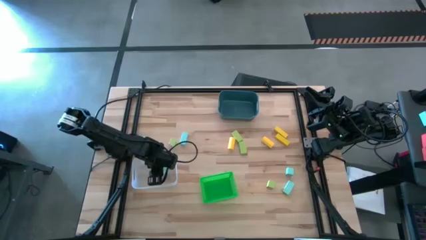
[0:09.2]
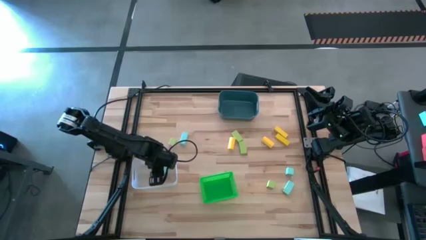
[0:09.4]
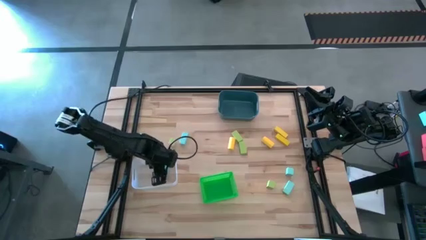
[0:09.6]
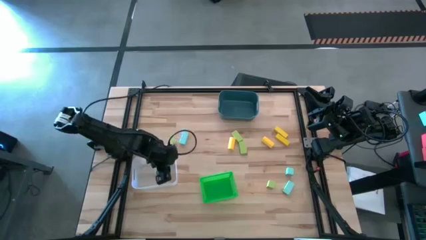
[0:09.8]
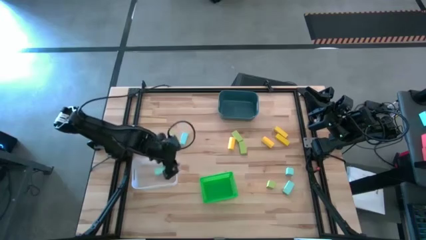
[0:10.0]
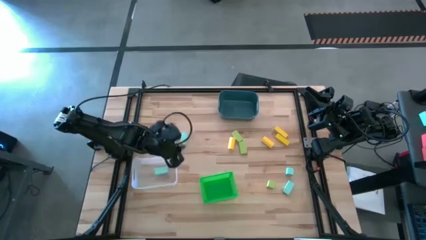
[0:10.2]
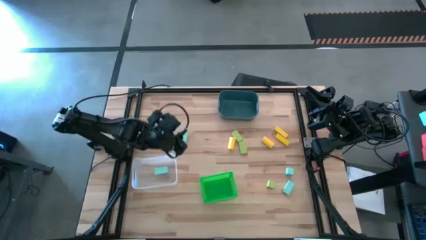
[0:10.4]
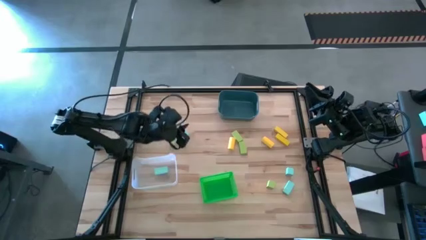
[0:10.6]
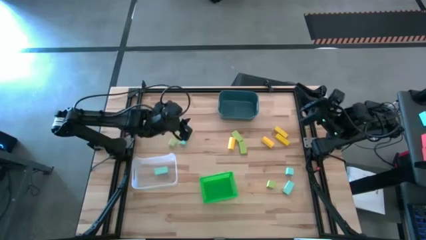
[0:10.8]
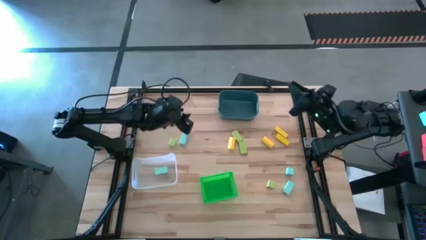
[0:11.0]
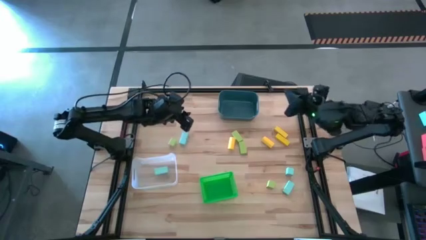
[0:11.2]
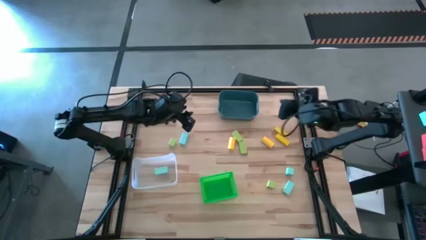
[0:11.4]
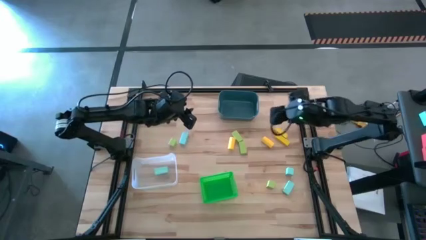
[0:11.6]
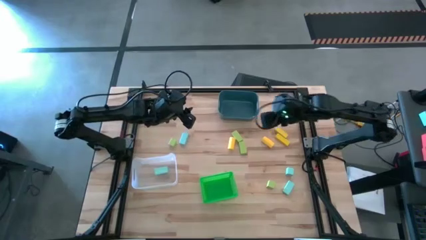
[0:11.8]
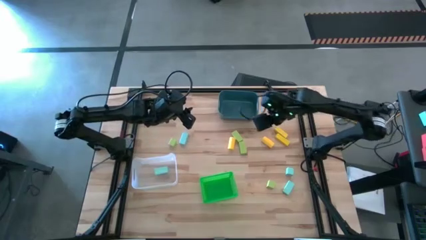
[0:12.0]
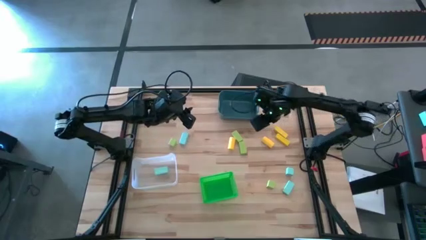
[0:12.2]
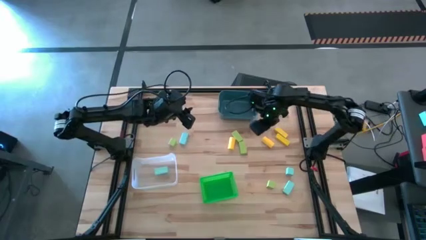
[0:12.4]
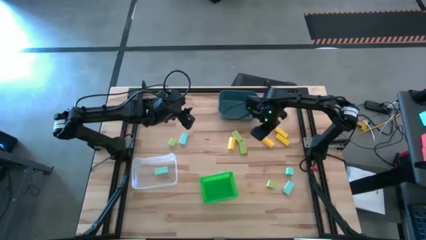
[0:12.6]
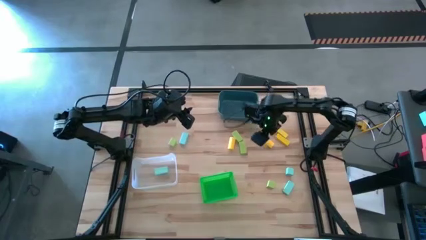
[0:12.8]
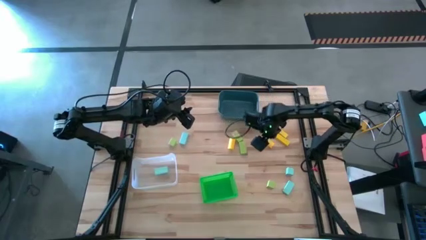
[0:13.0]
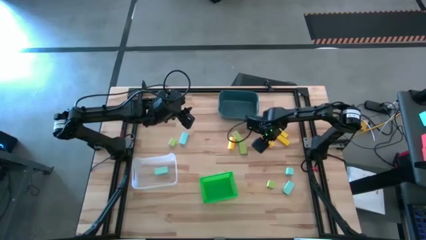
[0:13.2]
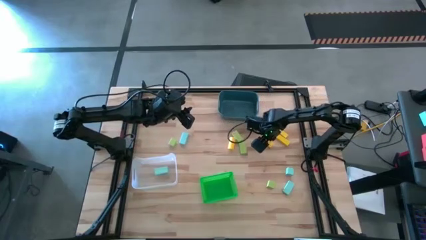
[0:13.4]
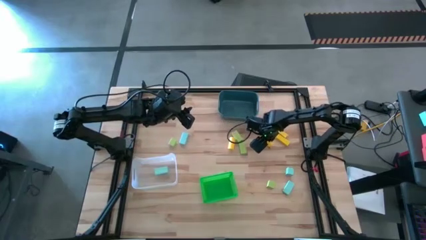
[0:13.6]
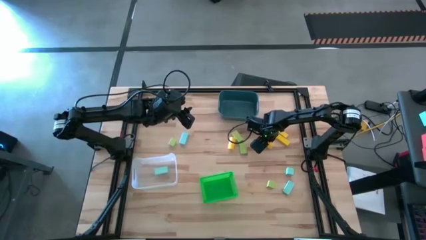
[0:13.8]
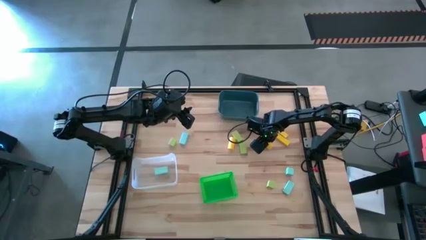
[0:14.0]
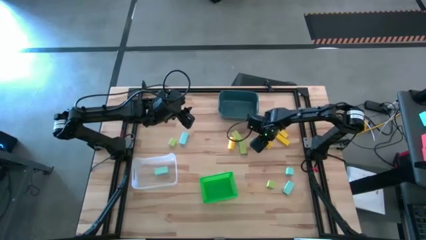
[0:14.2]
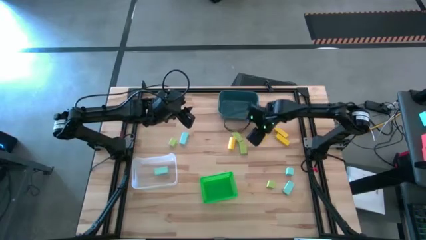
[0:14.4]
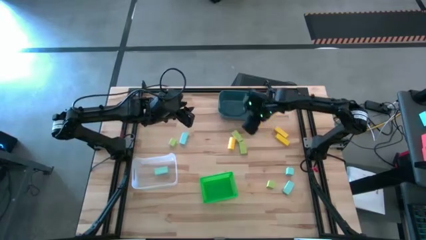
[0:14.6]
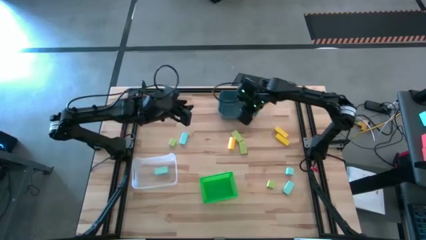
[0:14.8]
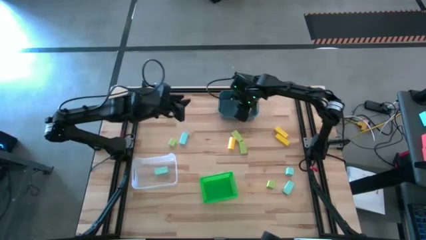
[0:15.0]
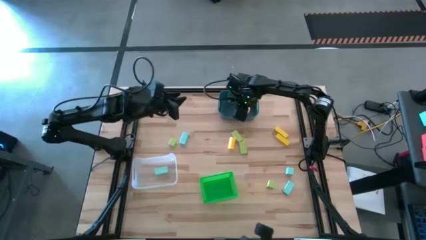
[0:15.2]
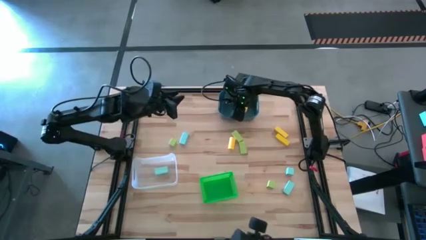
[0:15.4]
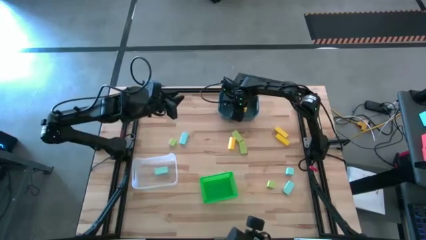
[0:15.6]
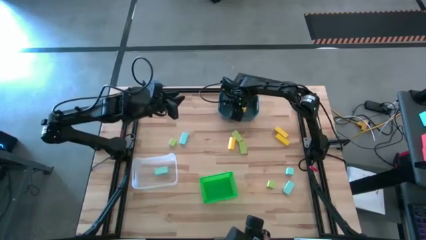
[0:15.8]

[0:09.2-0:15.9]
Task: Sort & place blocks by color
Put the yellow block into the blue bin

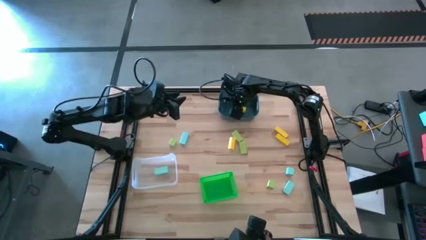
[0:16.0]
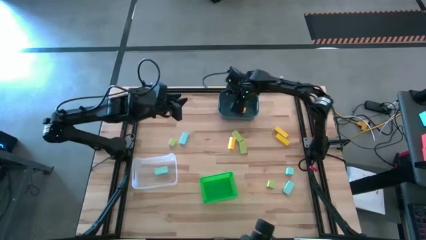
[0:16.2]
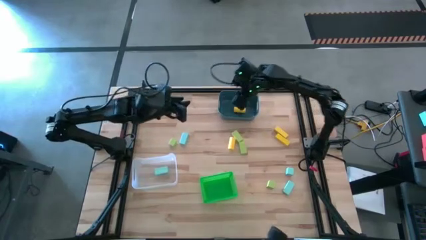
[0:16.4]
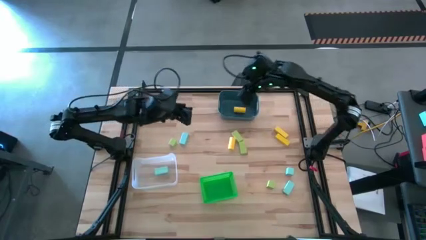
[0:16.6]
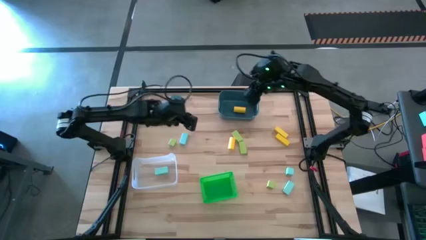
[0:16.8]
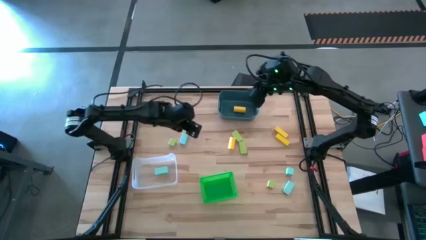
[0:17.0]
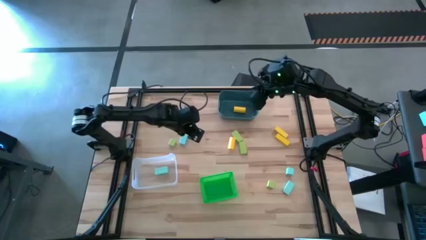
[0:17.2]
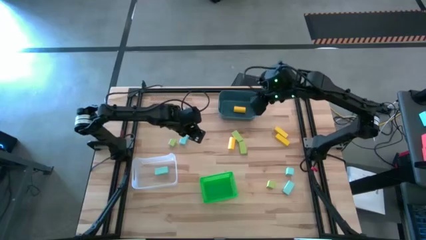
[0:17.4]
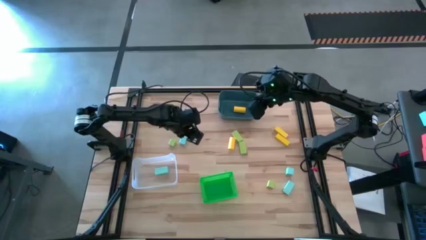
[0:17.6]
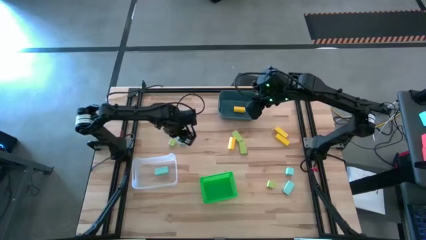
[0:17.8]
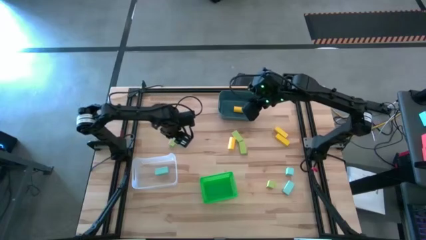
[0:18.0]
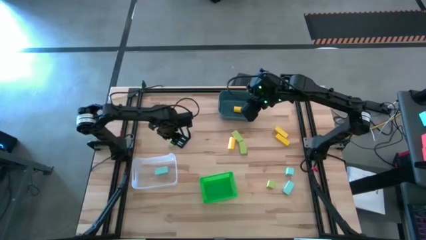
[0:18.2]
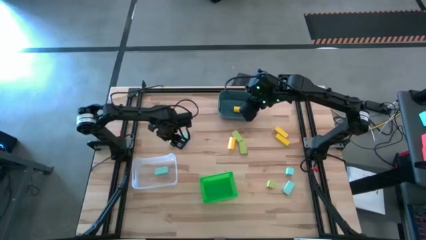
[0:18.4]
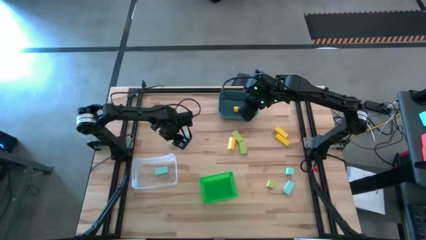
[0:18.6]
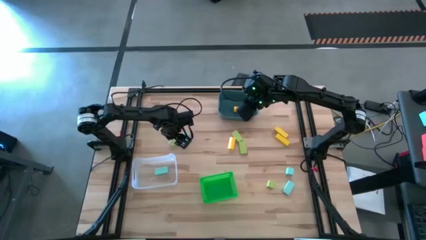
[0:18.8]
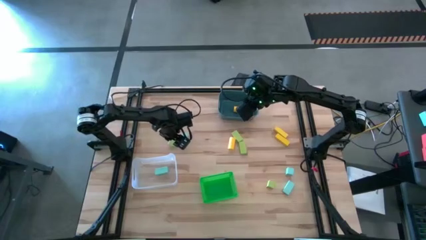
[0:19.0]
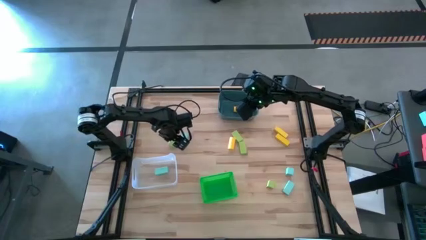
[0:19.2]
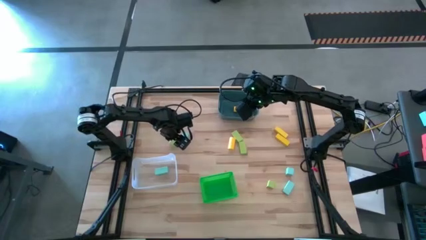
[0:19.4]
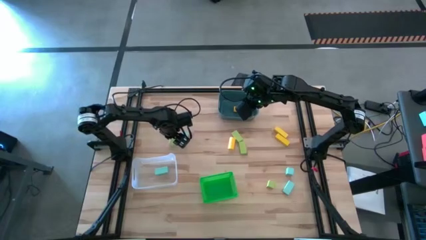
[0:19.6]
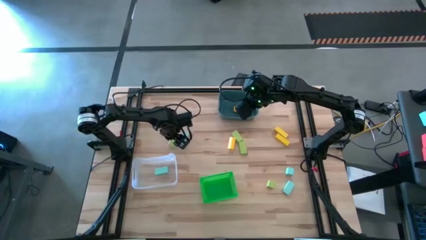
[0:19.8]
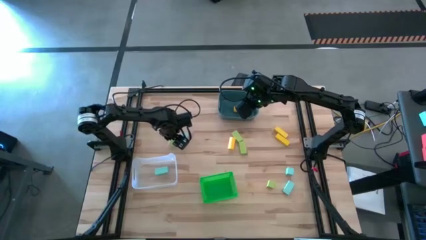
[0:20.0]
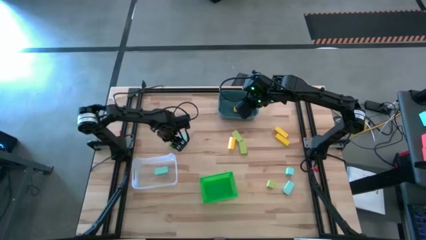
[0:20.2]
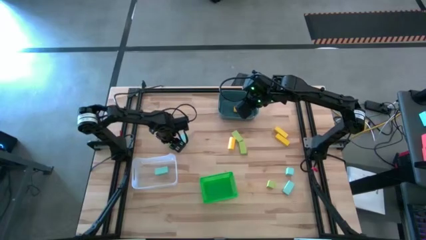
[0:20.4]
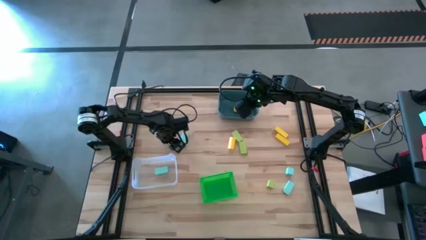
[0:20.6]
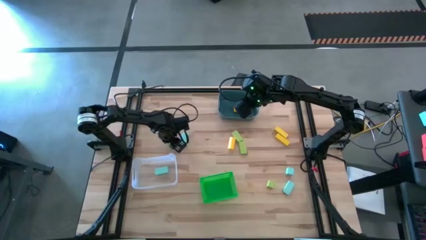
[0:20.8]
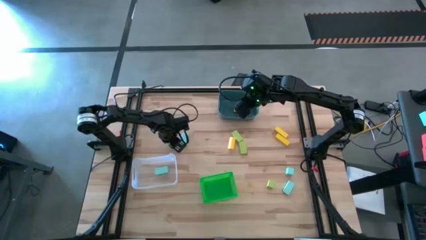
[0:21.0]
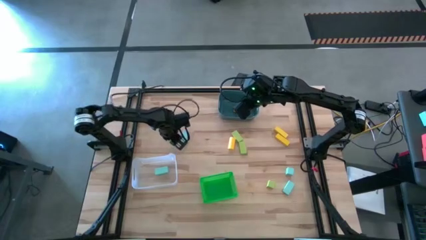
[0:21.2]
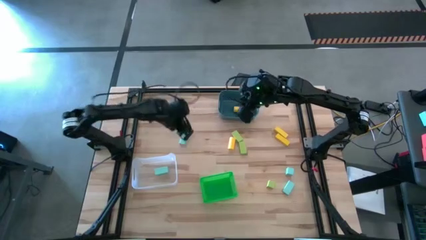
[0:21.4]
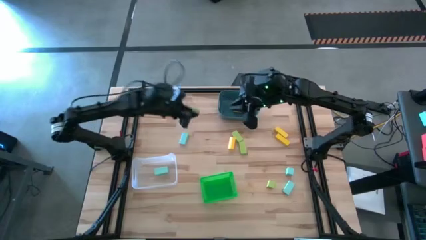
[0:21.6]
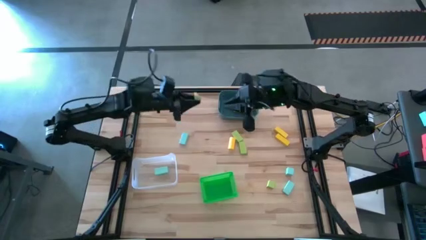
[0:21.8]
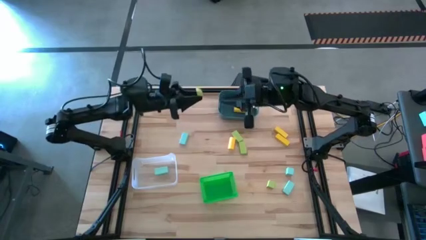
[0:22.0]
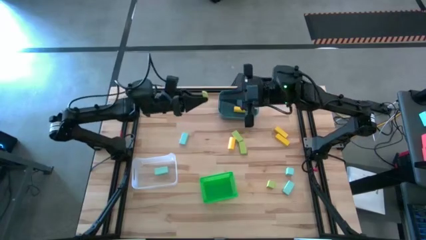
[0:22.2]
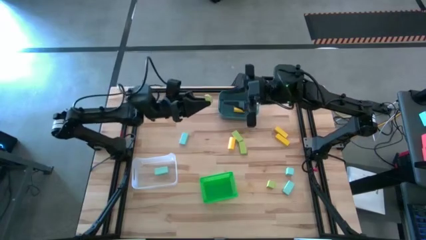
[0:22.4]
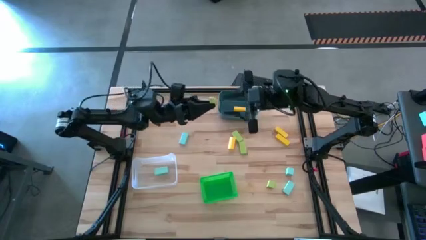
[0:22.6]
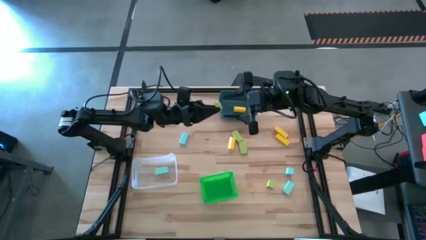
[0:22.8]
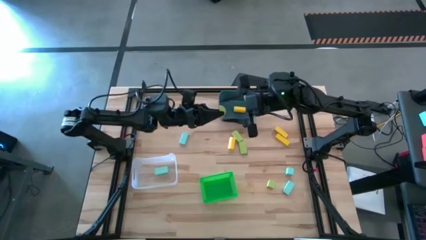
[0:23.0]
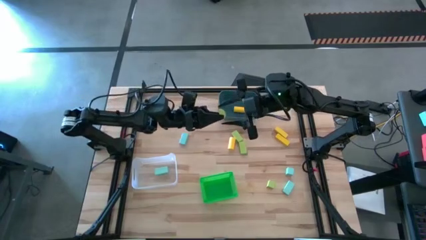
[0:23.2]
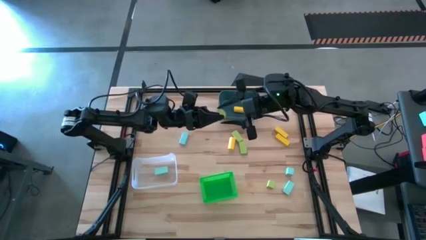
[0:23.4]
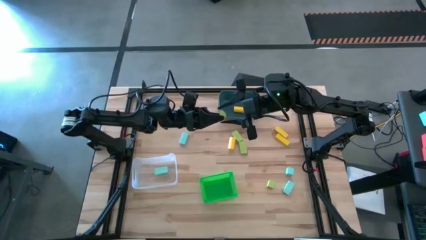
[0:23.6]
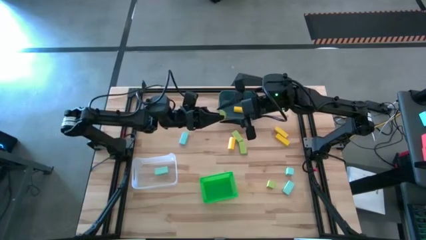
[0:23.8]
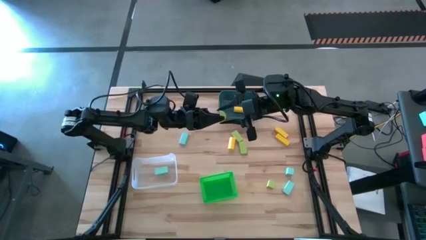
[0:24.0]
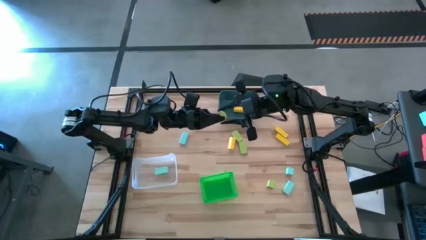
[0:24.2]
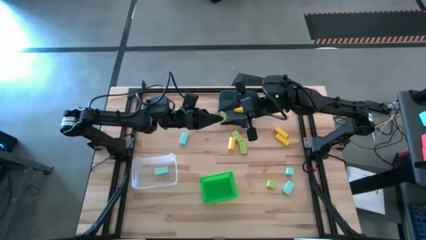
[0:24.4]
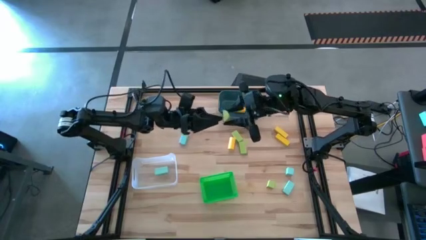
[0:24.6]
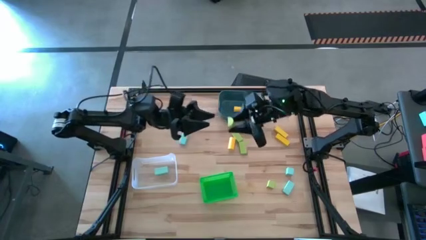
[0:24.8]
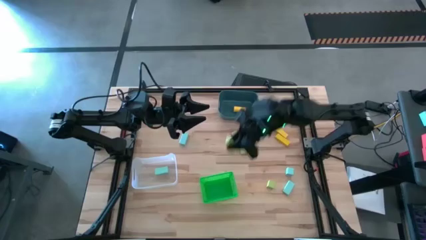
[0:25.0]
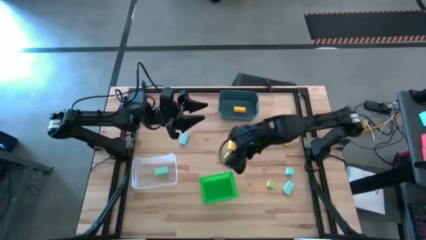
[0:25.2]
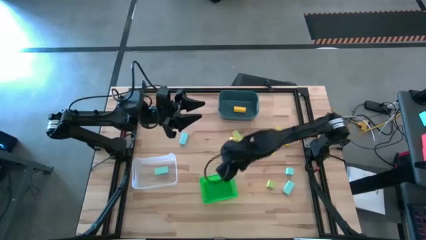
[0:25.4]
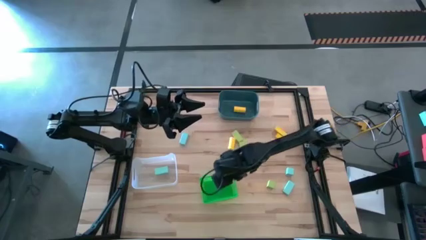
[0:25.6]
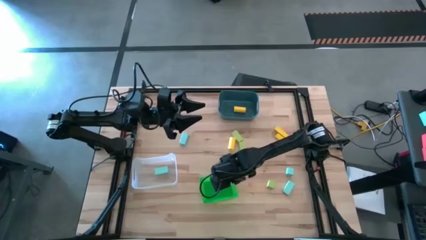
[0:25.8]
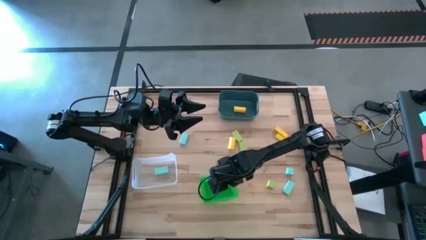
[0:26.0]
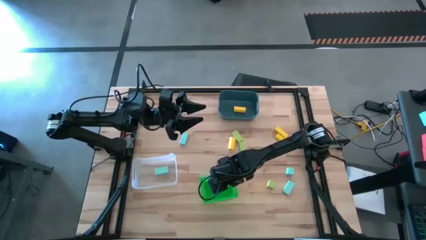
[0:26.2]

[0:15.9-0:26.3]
Put the green block into the green bin
